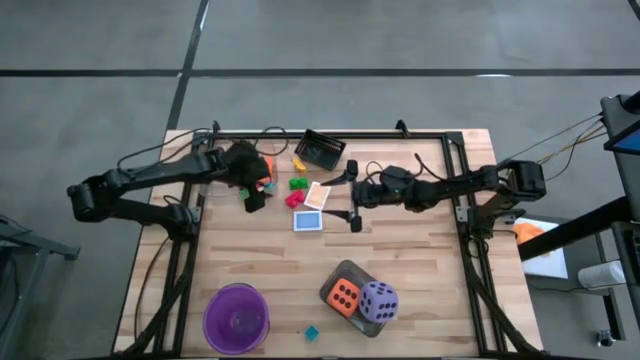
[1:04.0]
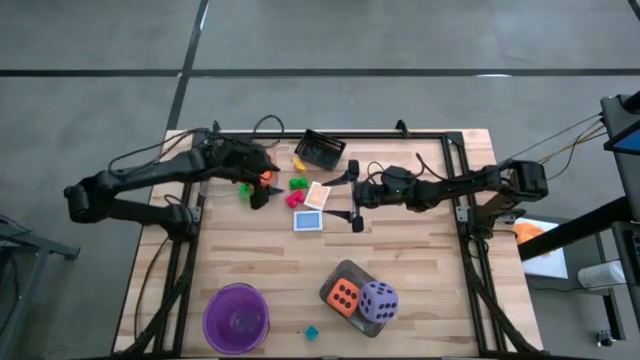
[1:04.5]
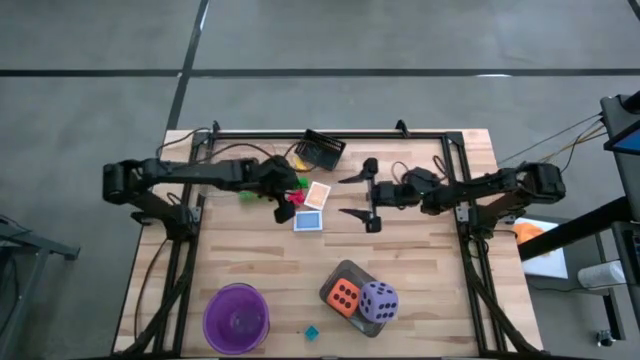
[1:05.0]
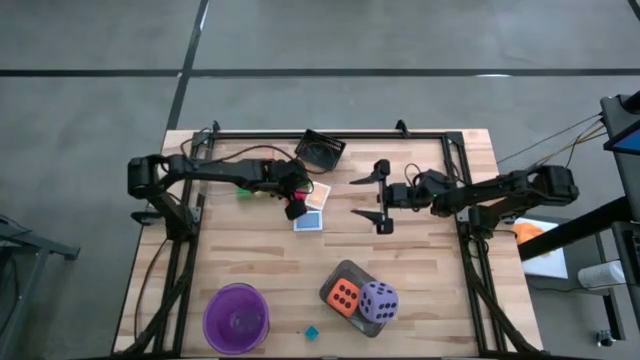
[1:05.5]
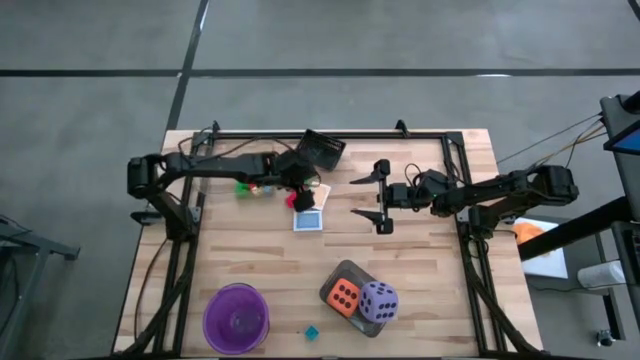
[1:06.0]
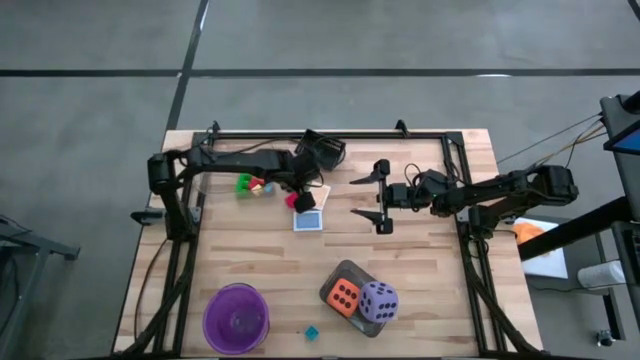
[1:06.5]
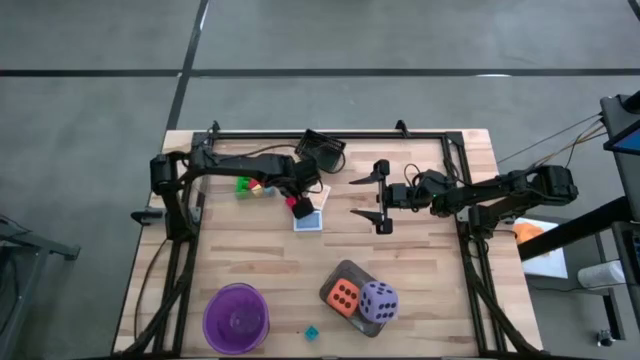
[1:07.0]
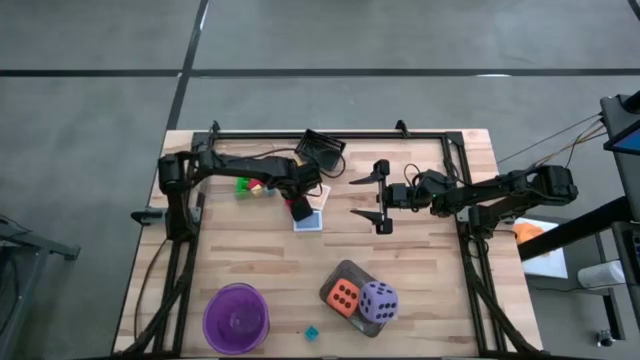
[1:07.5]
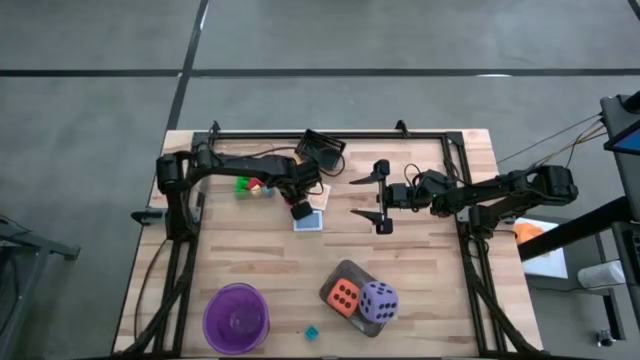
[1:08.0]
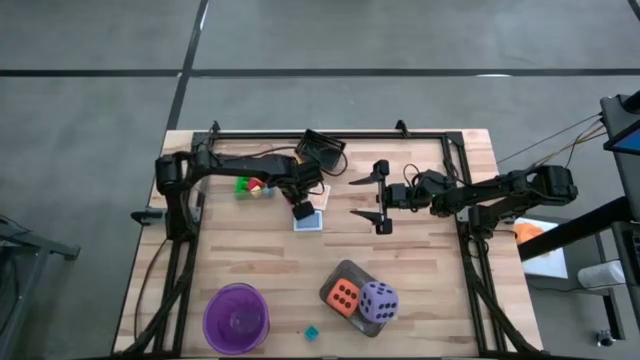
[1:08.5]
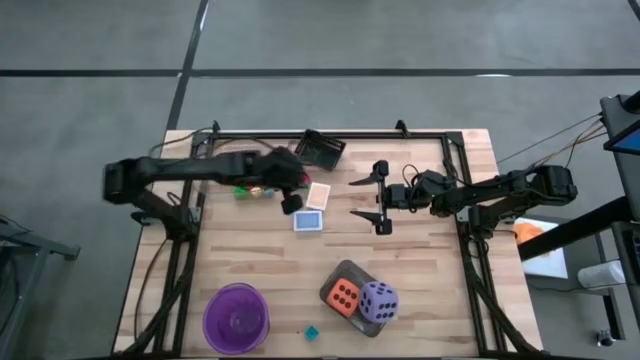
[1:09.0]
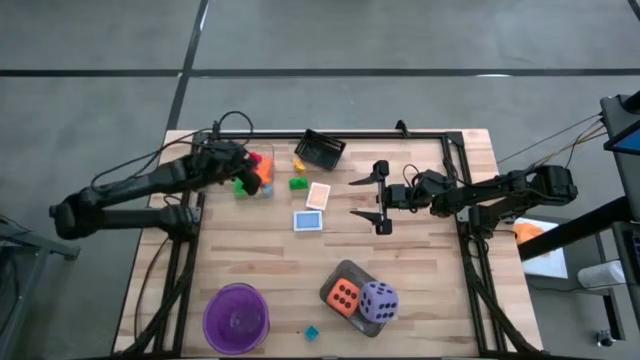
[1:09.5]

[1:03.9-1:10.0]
Task: Pick & Place Toys
Put the red game piece into the transparent bin

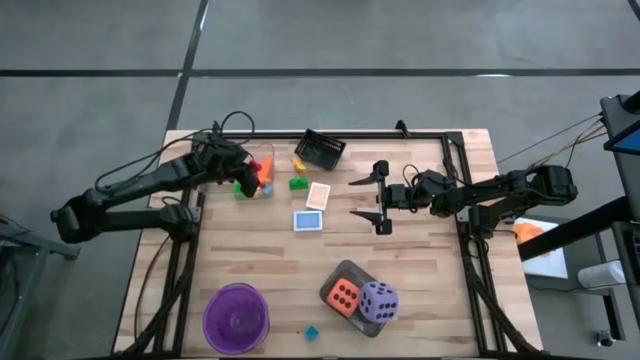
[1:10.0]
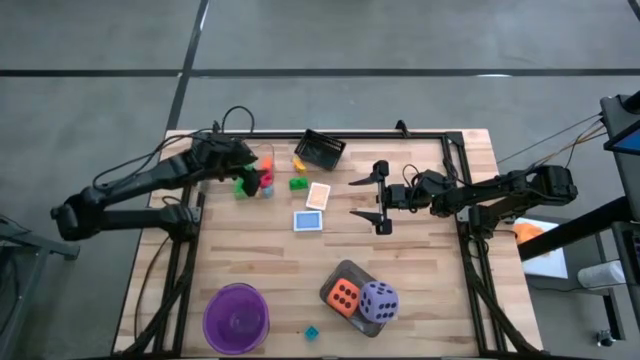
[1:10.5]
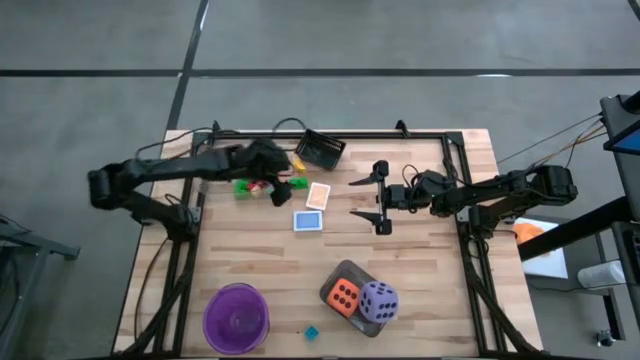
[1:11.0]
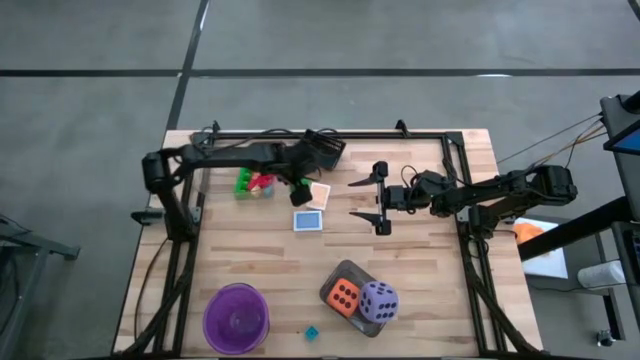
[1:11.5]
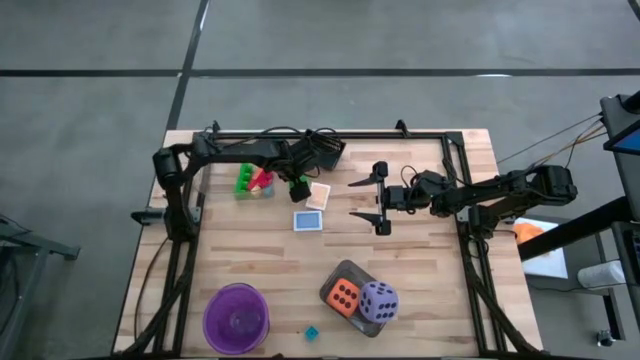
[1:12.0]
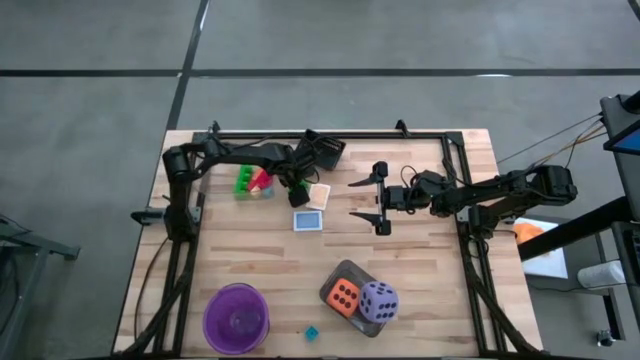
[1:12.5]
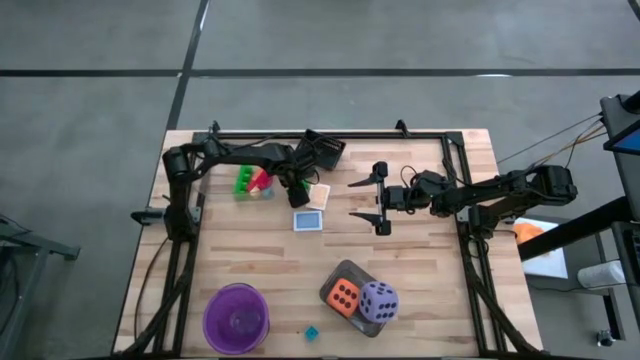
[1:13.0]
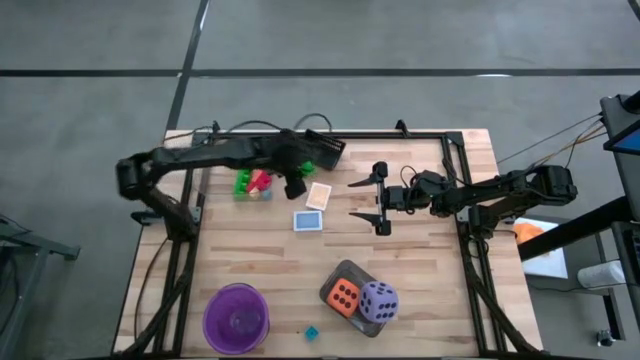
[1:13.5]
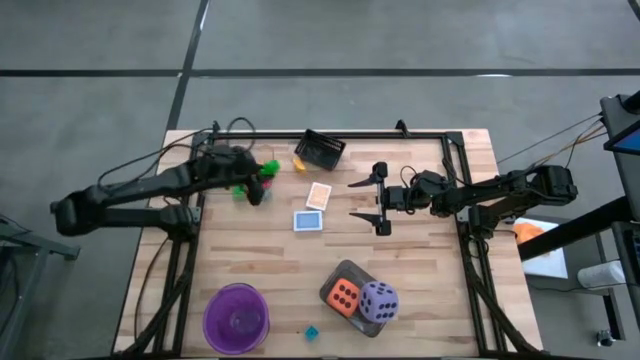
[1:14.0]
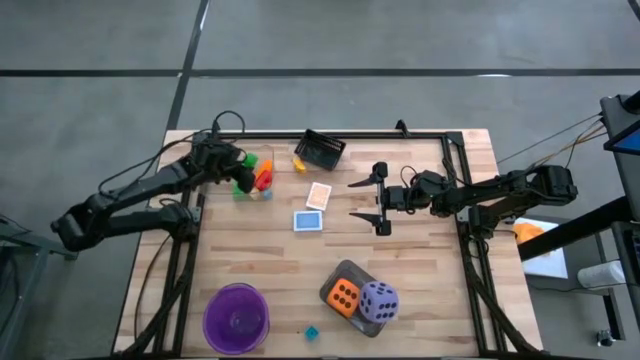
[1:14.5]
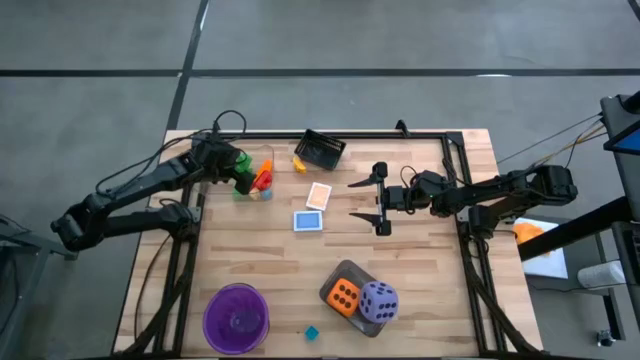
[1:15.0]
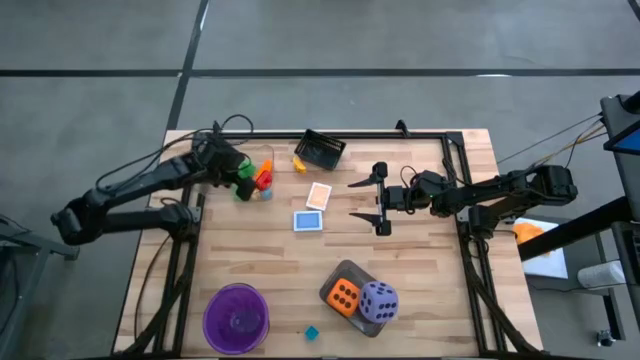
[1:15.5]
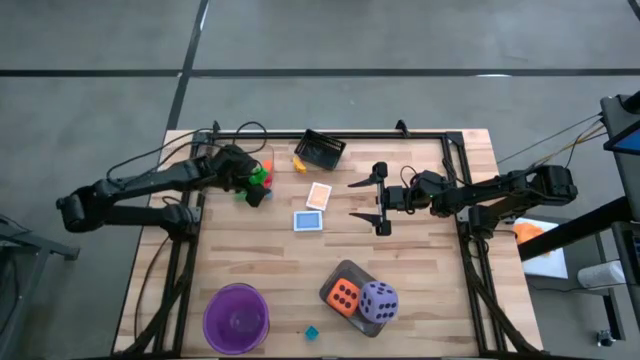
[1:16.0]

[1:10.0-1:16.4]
Put the green game piece into the transparent bin

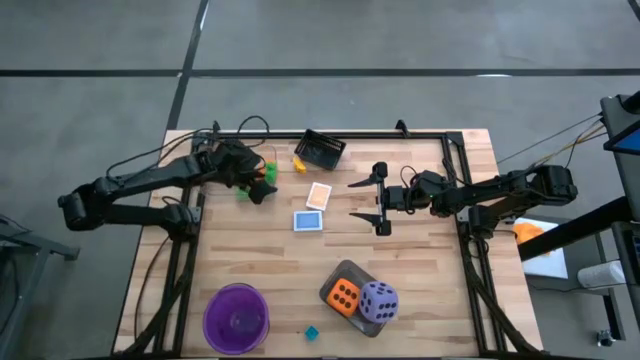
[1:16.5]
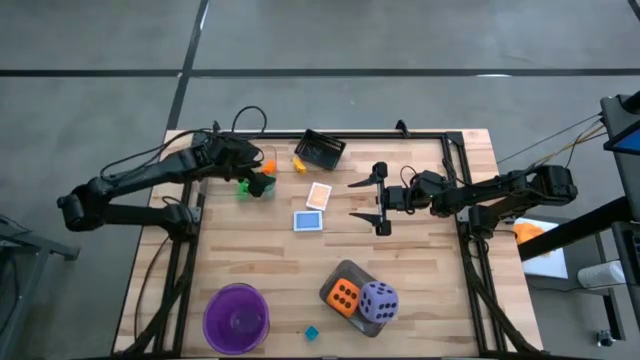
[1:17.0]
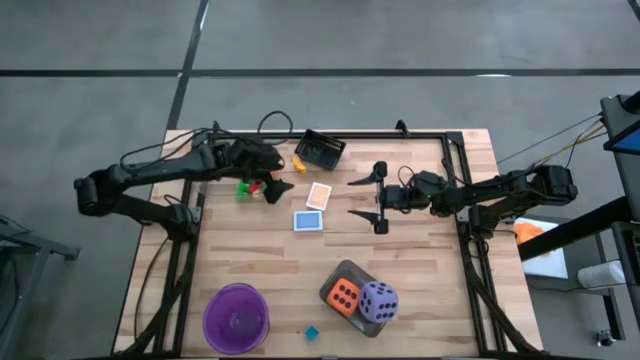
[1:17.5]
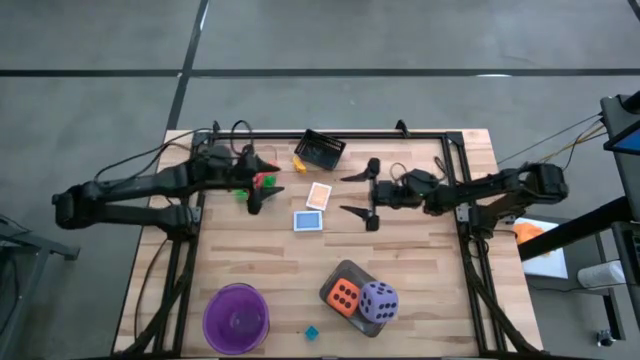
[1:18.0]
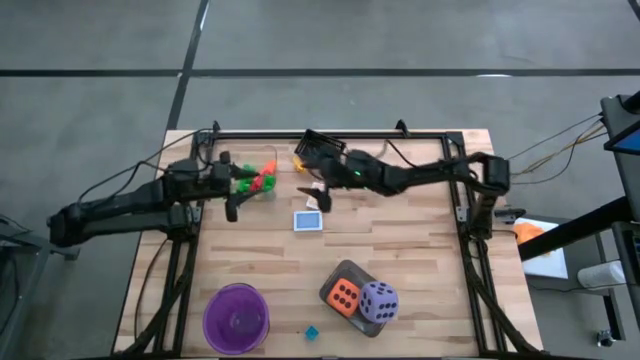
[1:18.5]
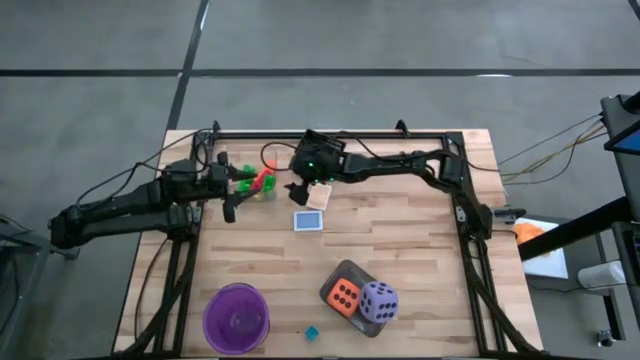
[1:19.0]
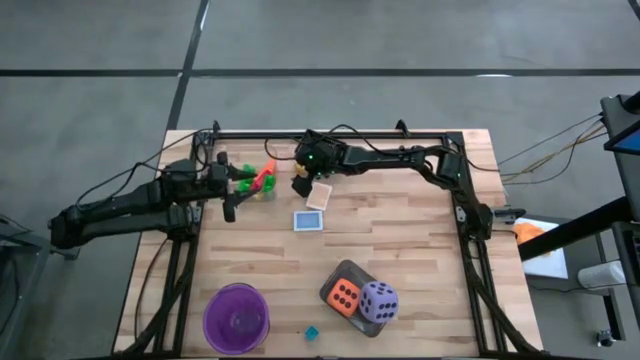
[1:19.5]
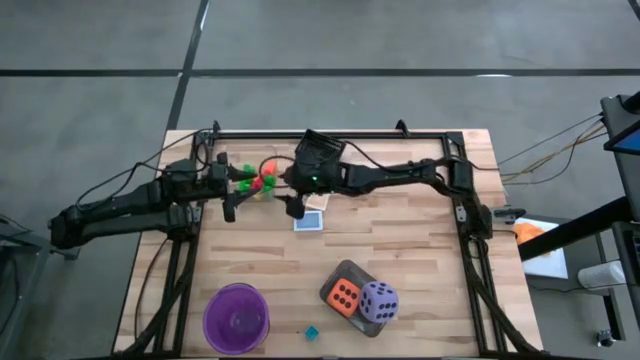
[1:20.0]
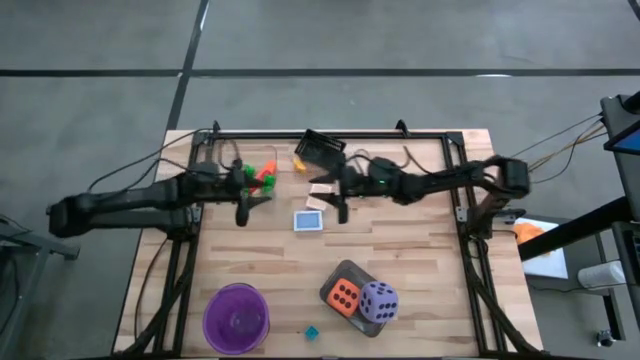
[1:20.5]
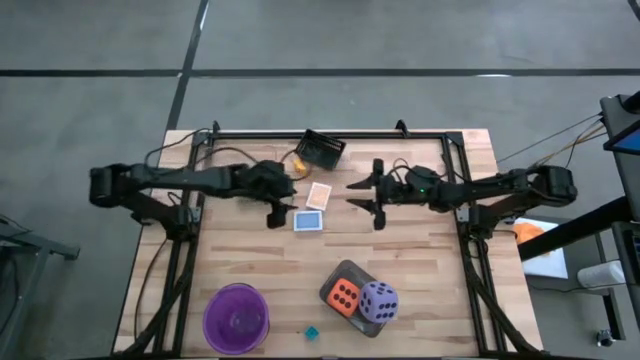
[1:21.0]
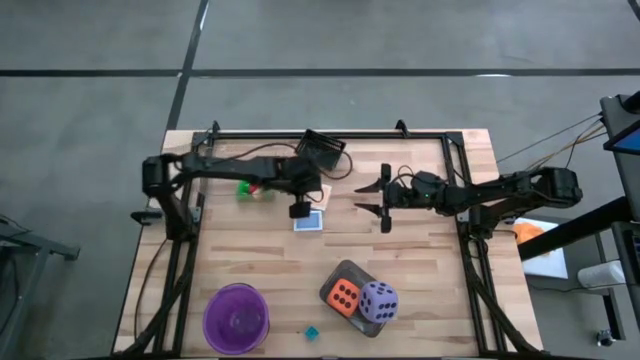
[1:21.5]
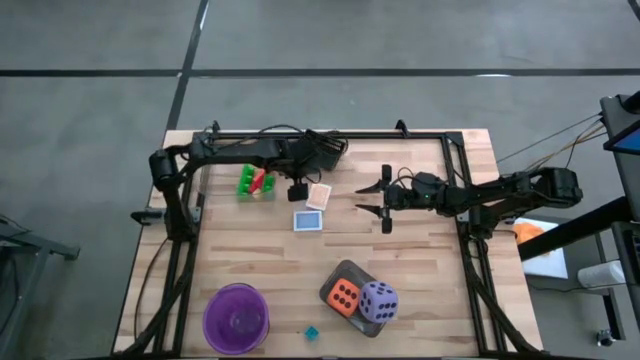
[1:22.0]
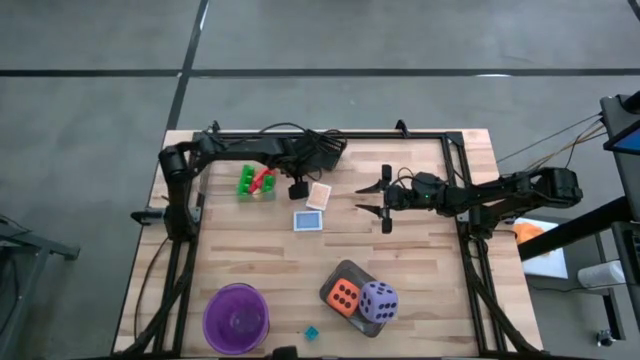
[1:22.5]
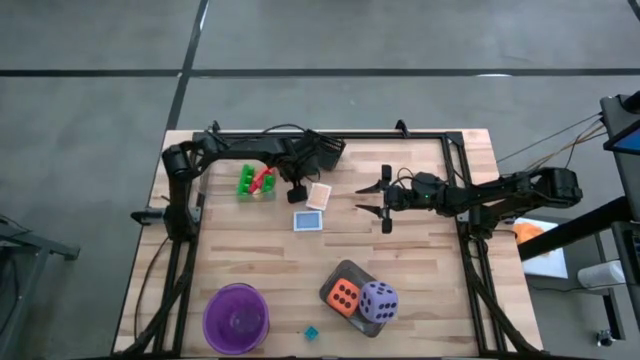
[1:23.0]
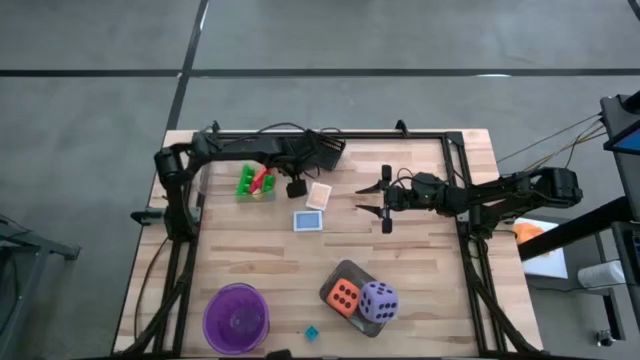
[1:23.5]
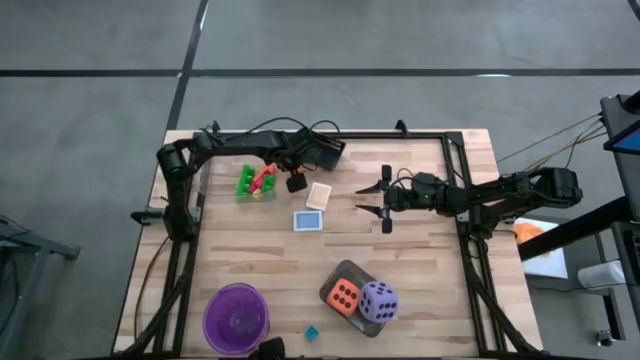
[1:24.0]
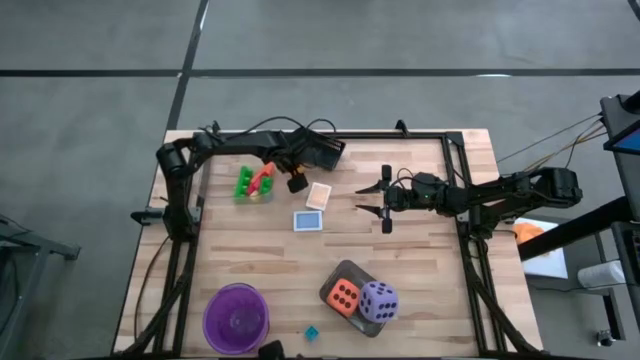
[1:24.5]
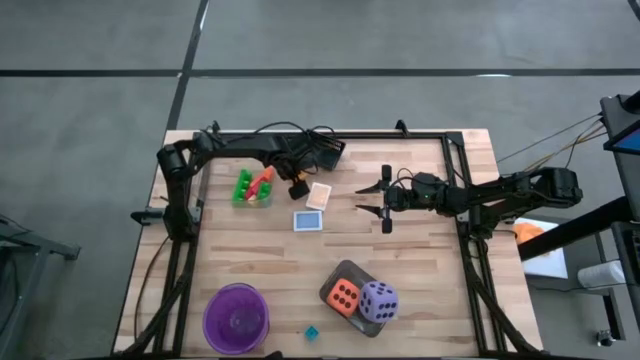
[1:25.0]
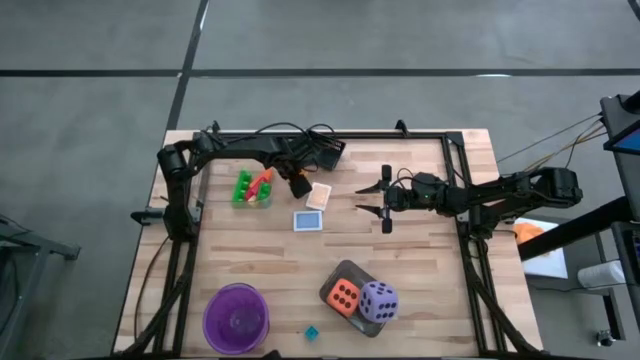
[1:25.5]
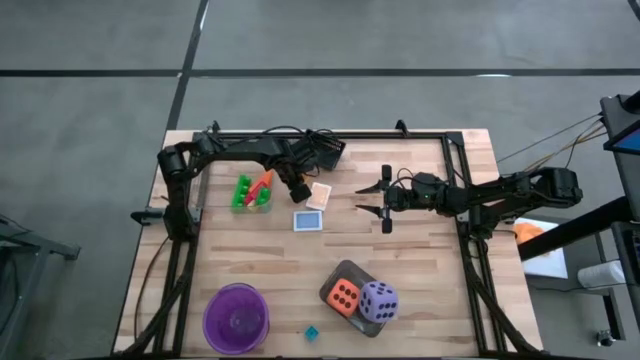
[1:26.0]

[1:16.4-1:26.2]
Put the yellow game piece into the transparent bin
